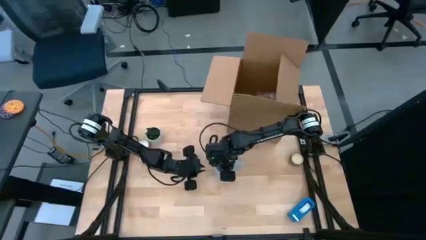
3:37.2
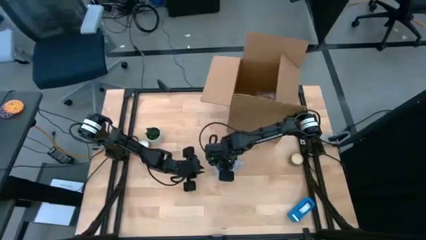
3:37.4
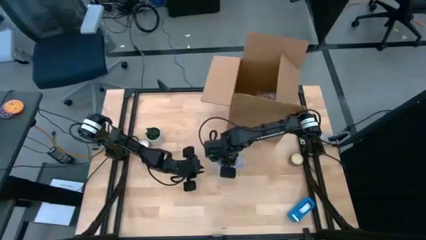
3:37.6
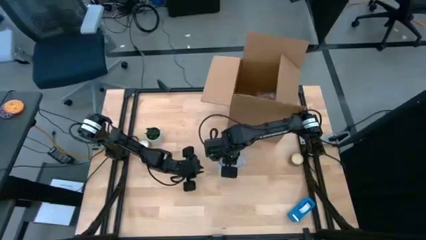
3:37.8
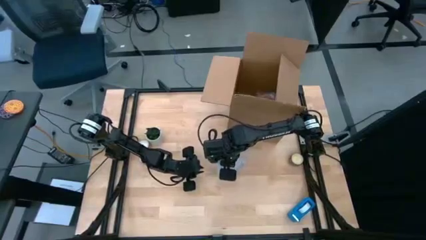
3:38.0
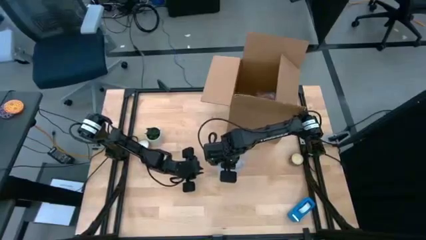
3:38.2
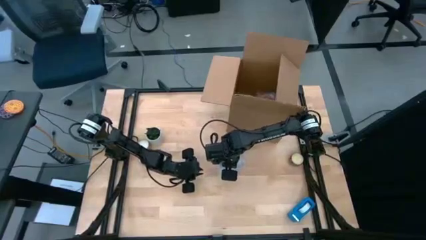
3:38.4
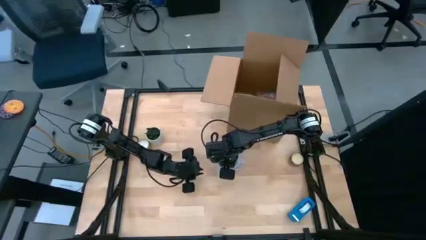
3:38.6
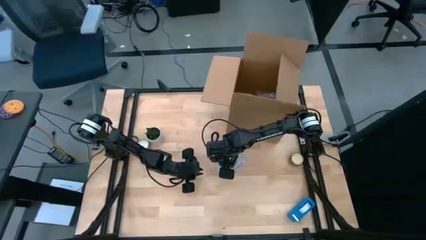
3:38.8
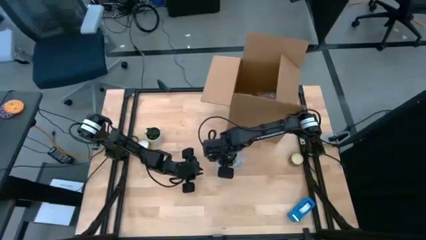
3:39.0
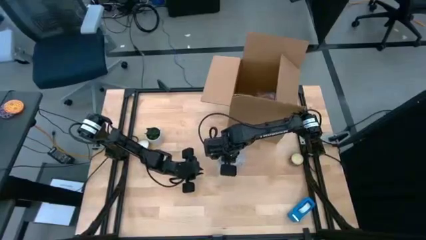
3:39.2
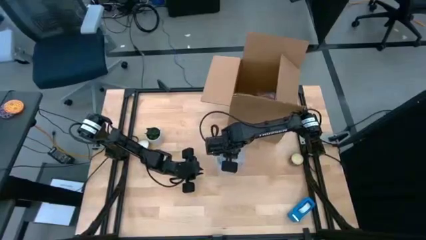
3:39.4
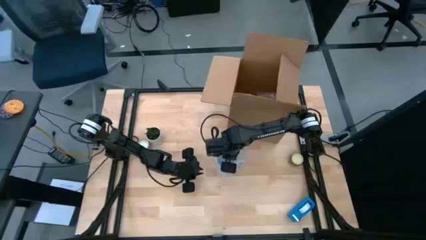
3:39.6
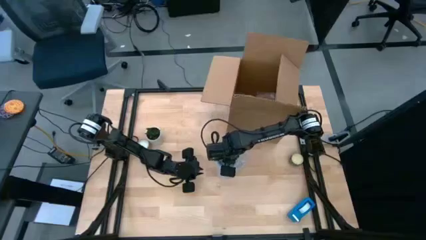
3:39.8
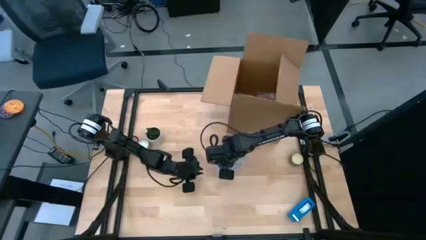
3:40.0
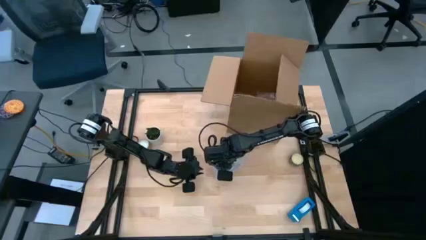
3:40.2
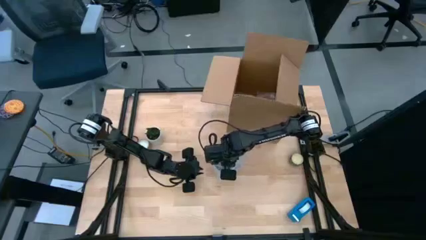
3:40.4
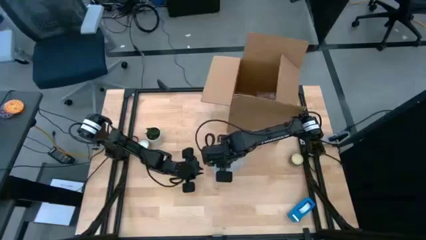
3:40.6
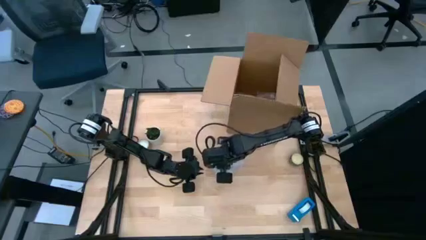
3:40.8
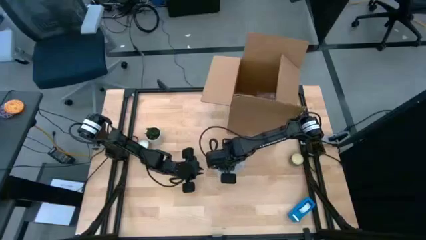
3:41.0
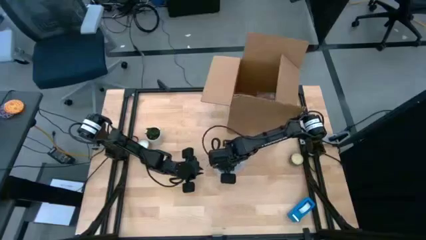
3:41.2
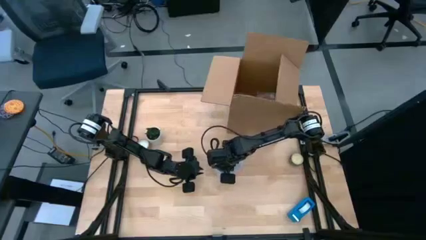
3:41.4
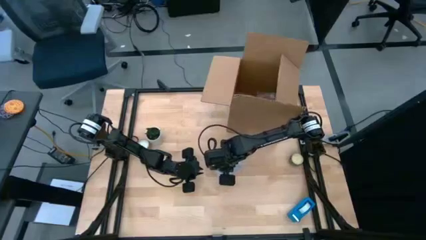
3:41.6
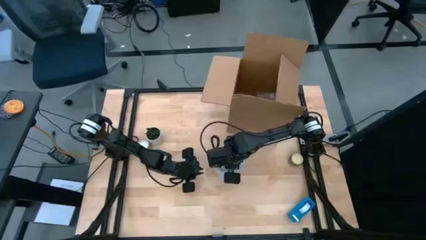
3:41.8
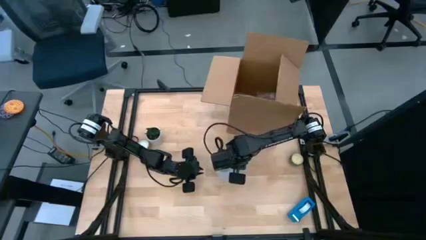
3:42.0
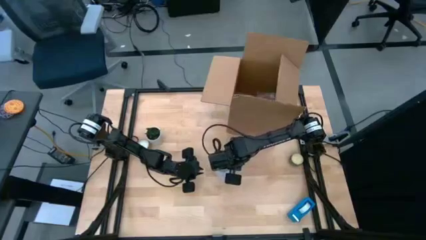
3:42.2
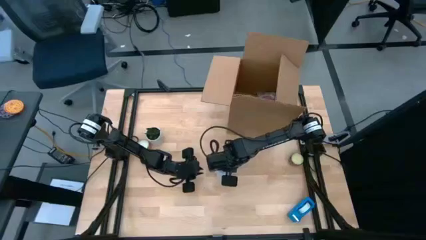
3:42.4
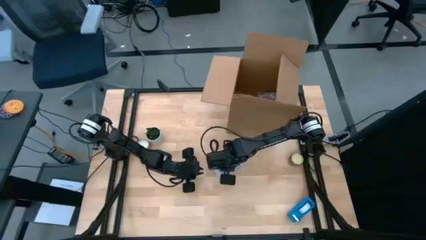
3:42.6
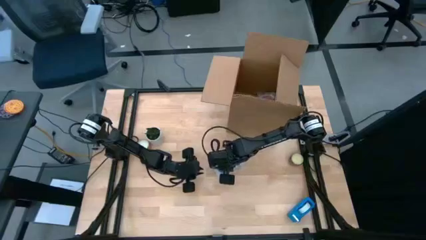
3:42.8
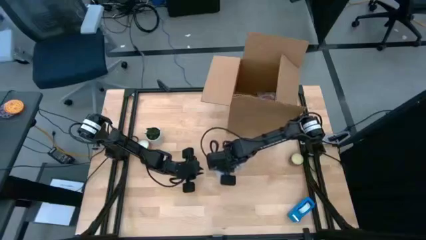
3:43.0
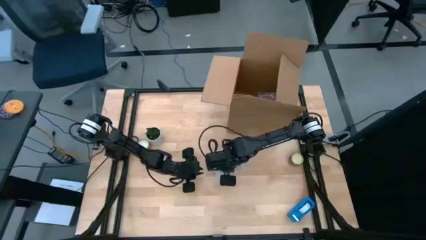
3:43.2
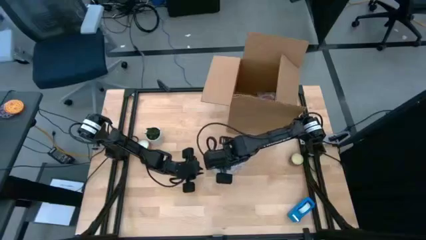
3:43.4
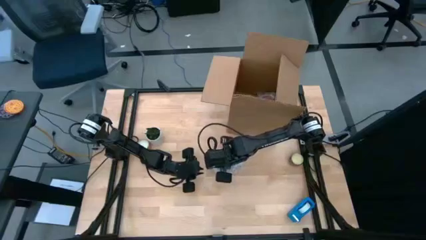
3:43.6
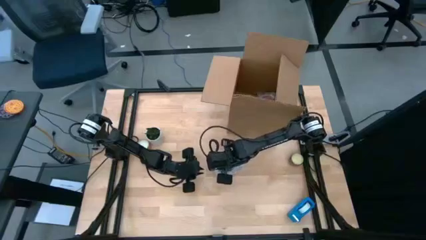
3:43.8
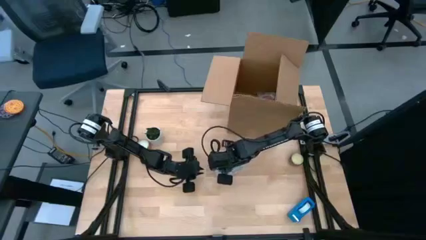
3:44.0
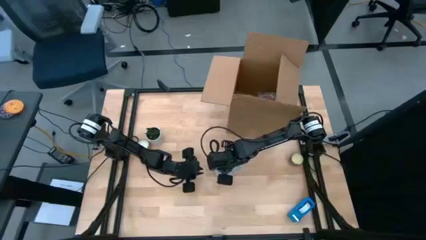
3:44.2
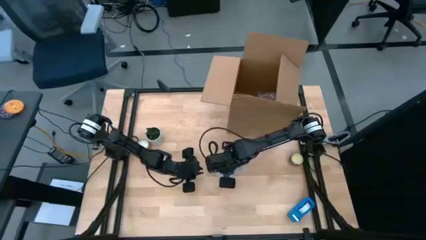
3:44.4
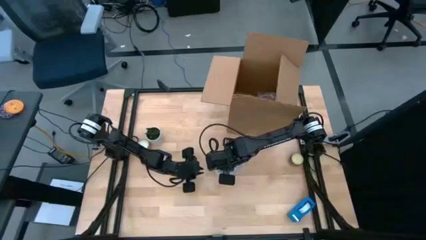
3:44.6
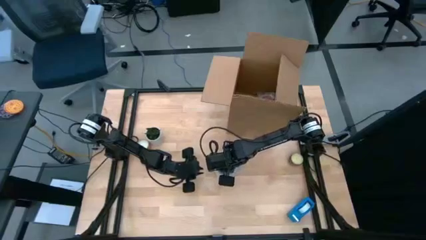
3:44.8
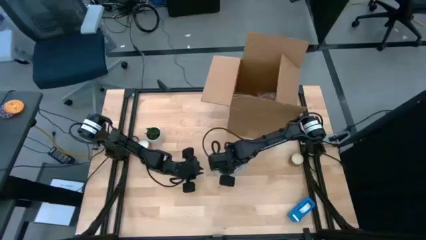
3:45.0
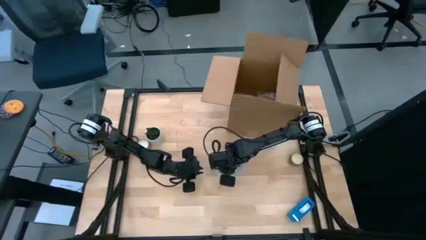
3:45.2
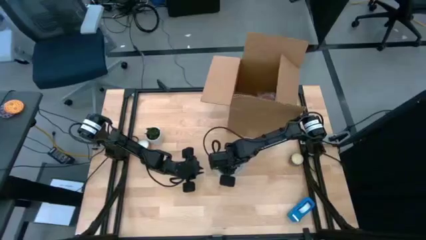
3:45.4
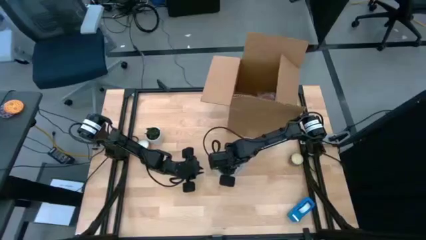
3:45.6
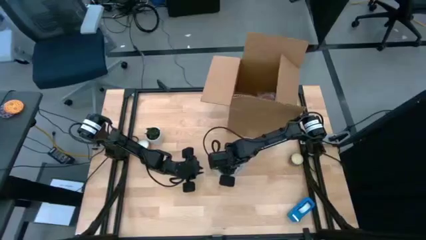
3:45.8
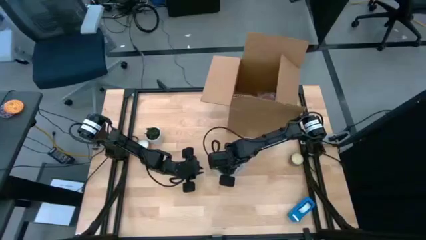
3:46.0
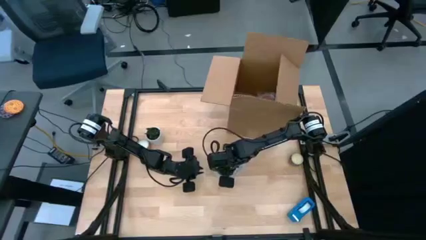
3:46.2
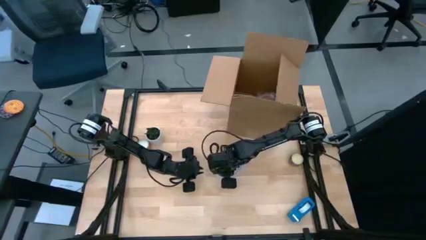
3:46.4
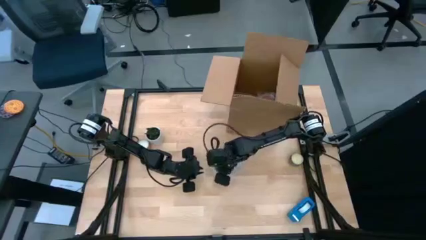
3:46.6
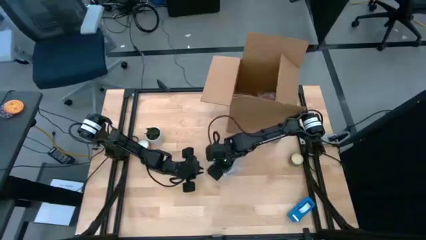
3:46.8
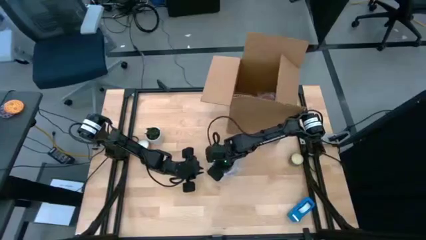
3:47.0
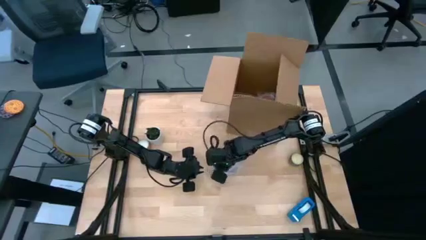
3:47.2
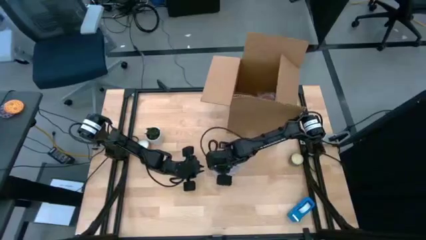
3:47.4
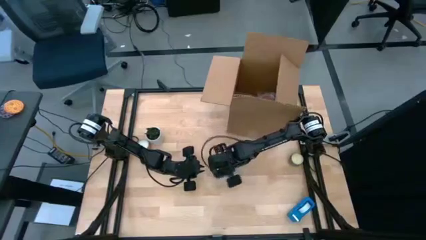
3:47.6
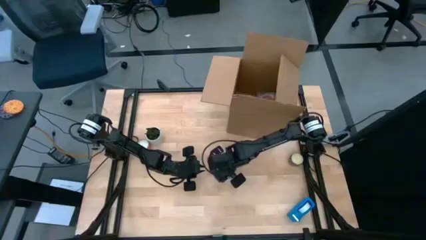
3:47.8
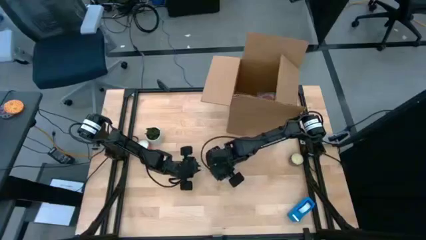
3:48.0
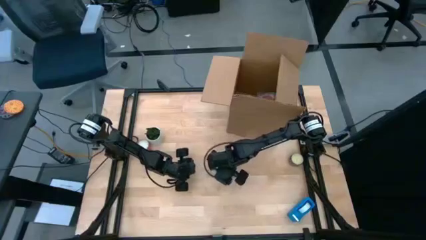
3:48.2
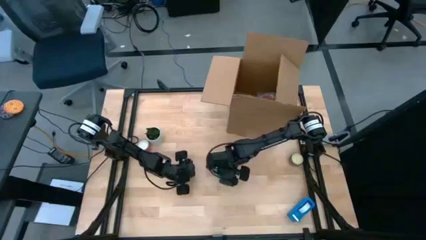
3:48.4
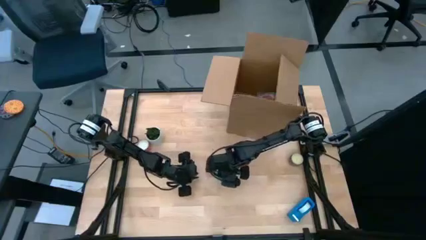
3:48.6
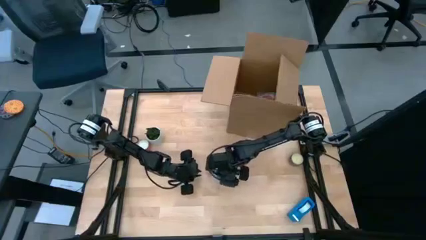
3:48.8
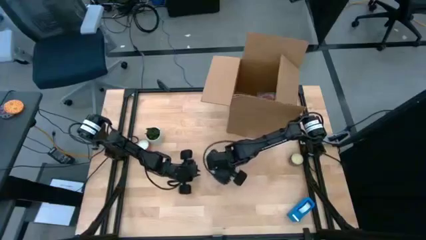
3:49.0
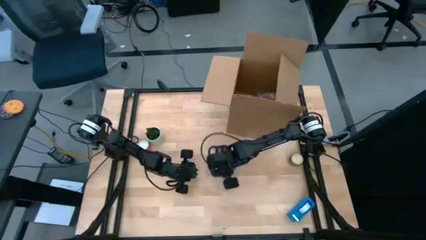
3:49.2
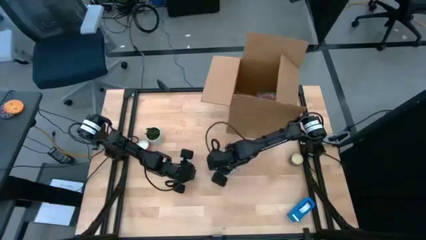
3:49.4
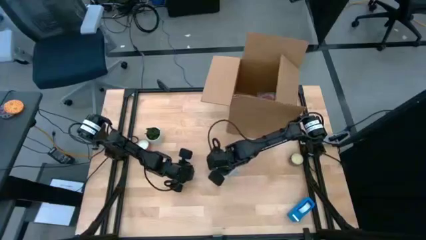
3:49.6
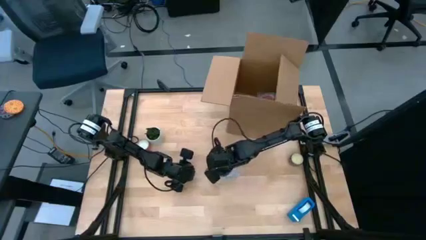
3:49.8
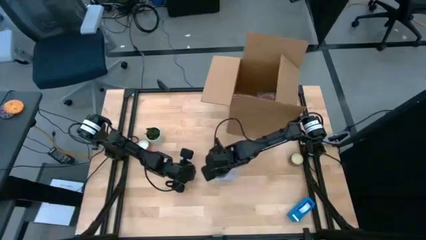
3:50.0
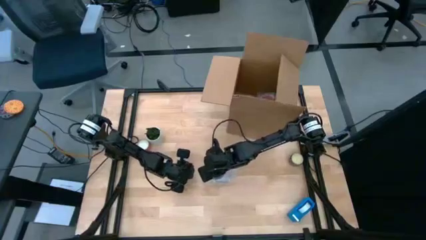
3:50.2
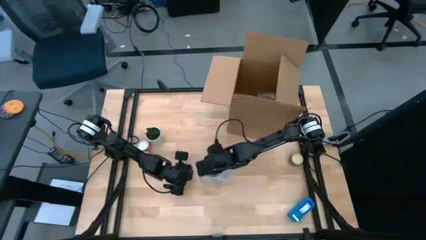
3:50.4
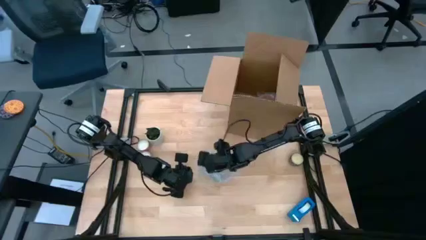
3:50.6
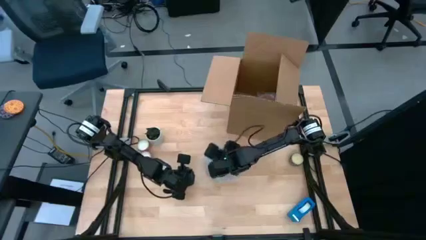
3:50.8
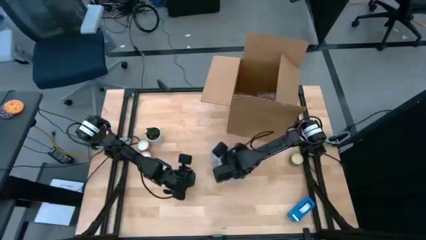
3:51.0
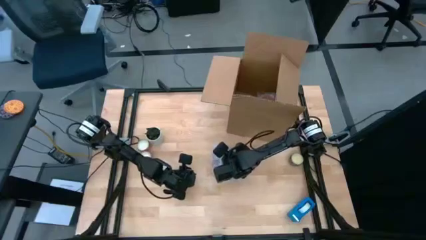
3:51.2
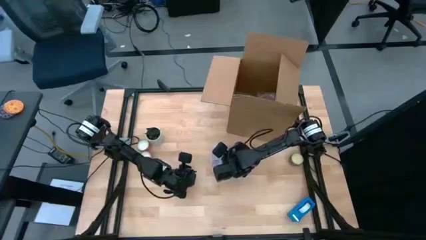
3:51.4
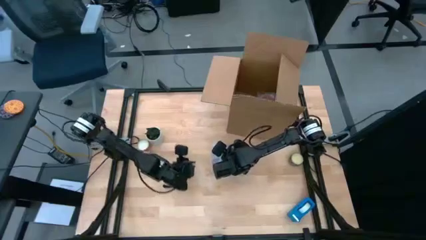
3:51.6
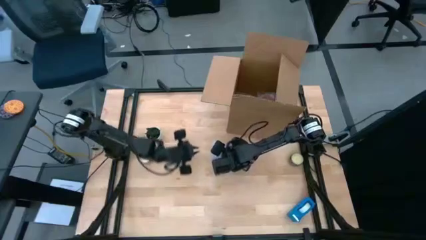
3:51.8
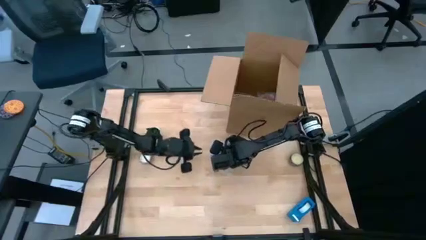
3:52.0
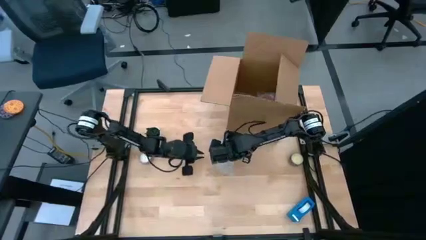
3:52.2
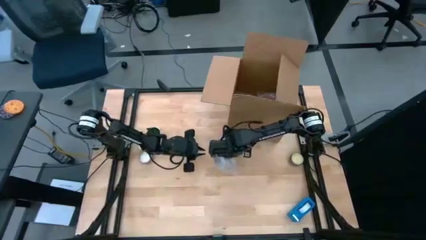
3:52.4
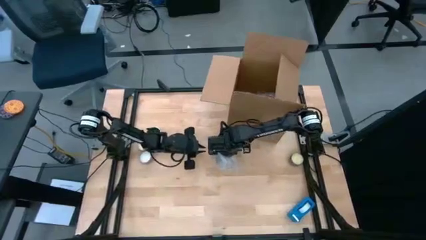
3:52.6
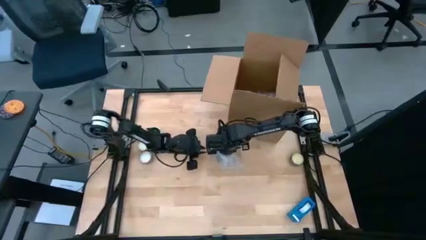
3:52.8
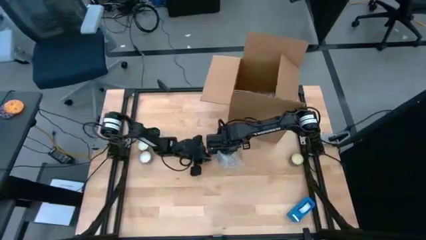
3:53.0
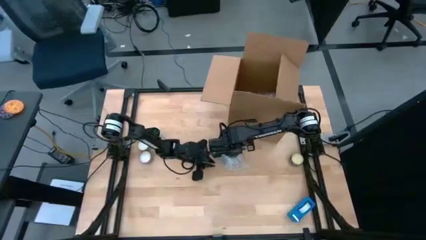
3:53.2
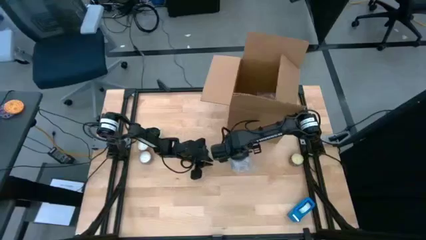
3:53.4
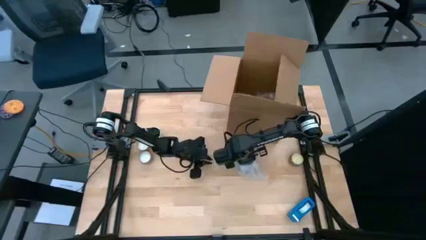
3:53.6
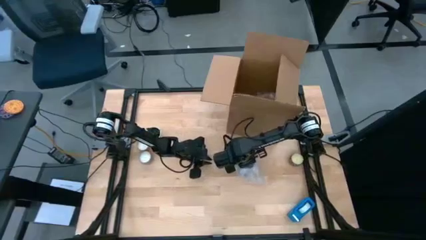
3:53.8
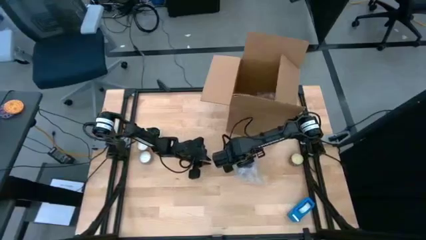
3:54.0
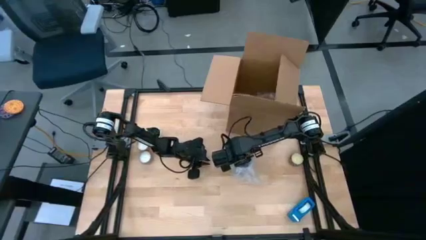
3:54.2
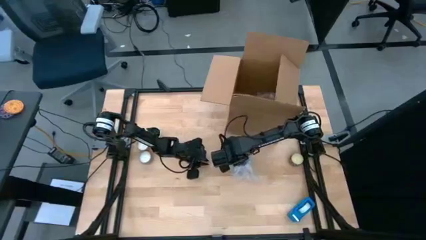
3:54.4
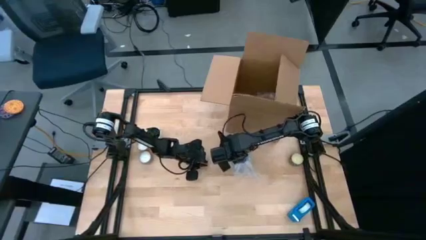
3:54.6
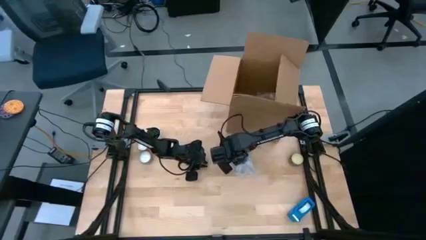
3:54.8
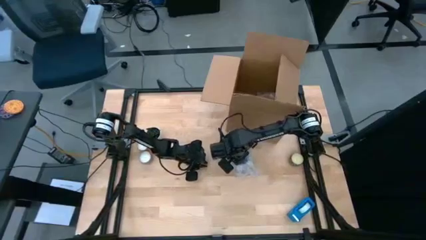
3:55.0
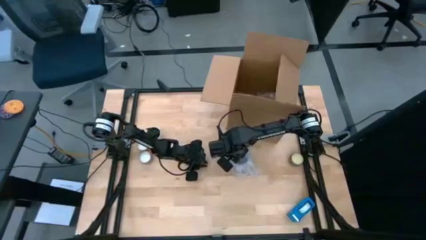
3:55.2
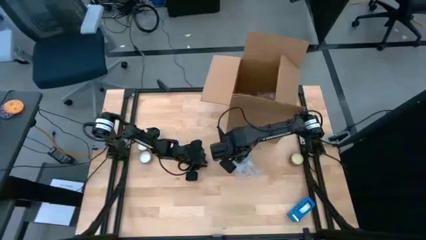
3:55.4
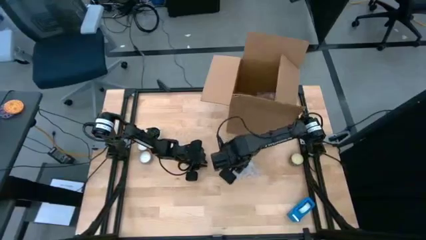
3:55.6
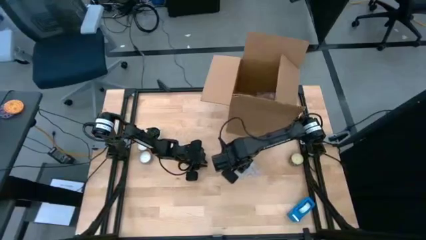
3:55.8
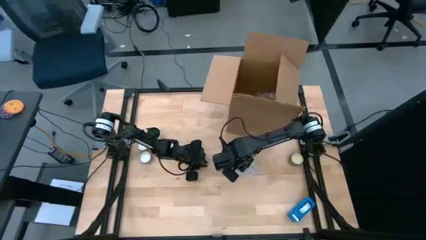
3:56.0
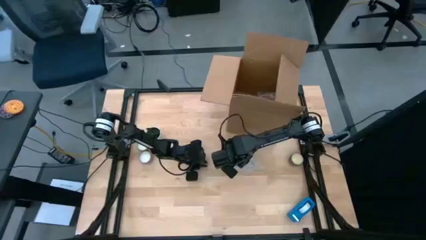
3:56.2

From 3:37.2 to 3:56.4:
Task: wrap mug
Wrap the purple mug with the bubble wrap
